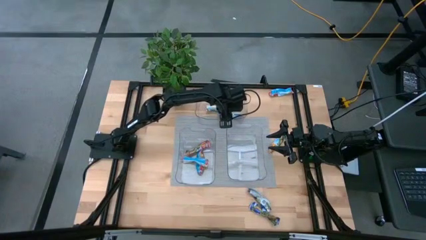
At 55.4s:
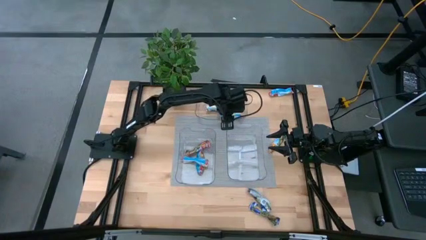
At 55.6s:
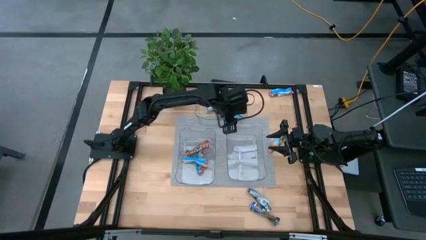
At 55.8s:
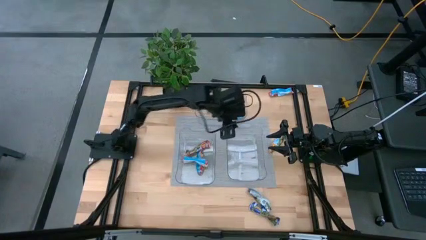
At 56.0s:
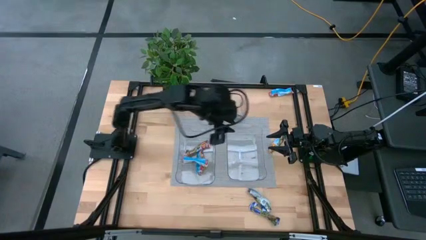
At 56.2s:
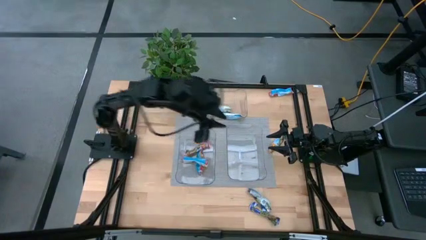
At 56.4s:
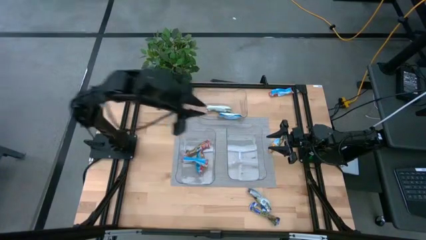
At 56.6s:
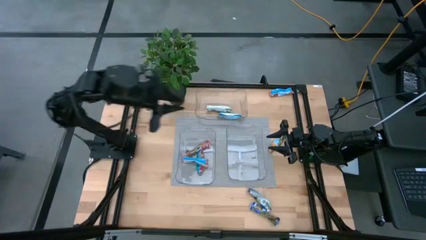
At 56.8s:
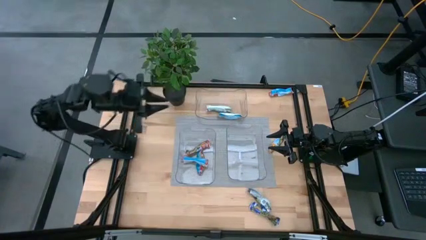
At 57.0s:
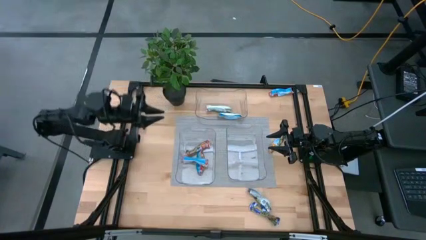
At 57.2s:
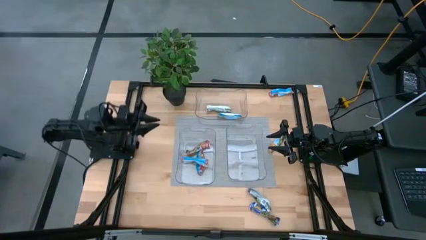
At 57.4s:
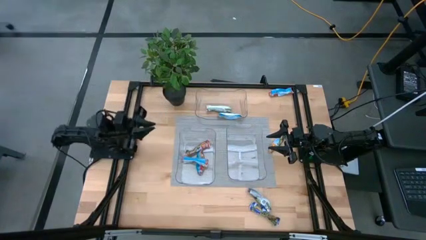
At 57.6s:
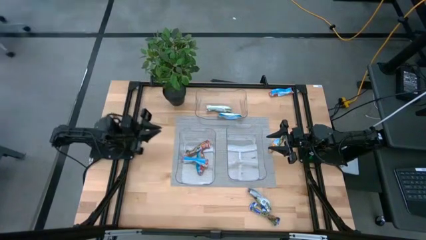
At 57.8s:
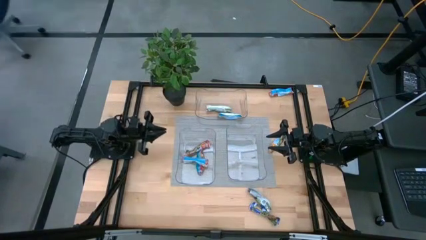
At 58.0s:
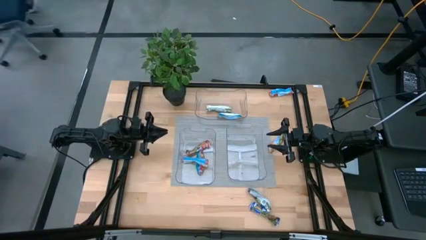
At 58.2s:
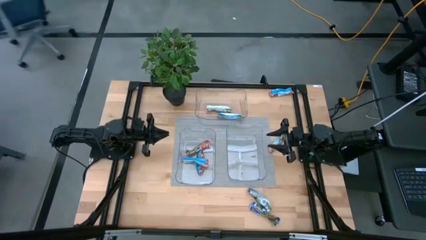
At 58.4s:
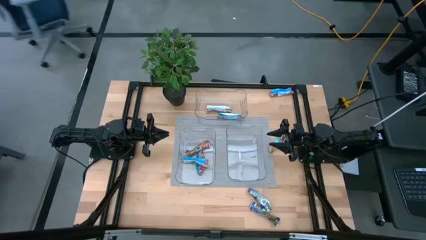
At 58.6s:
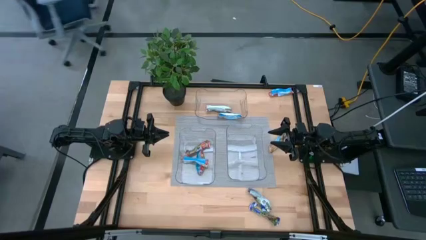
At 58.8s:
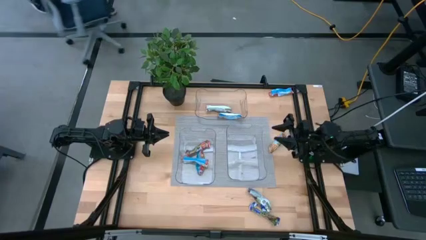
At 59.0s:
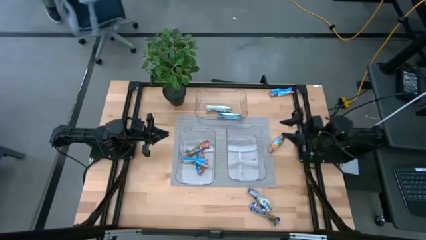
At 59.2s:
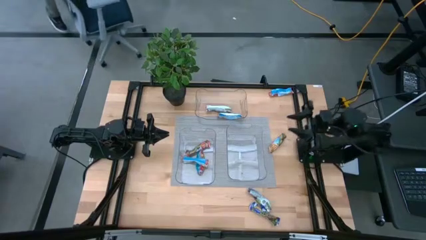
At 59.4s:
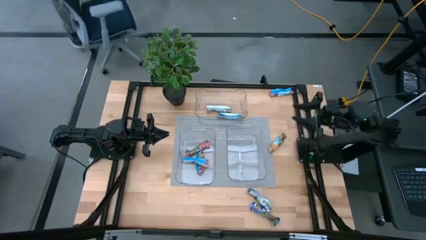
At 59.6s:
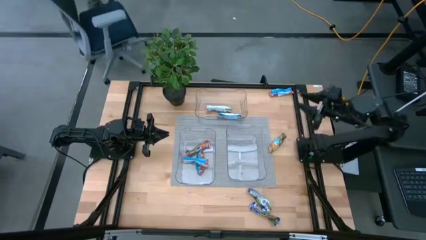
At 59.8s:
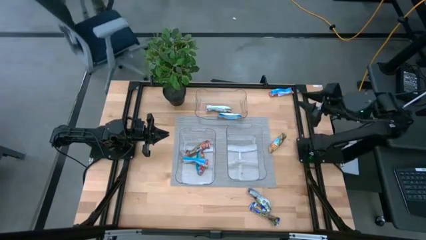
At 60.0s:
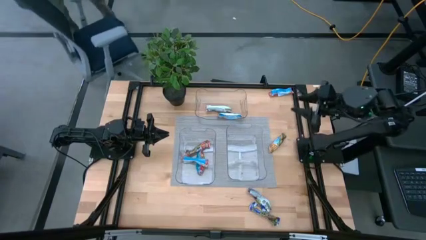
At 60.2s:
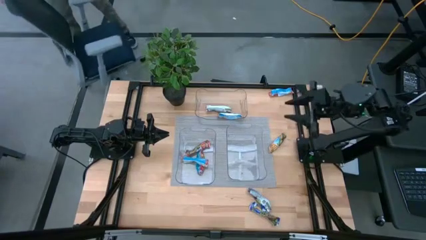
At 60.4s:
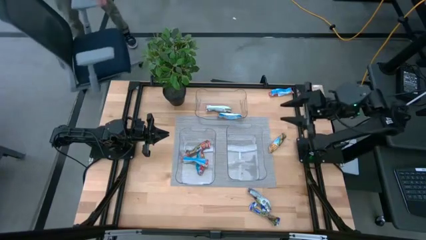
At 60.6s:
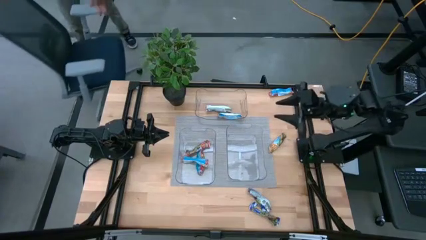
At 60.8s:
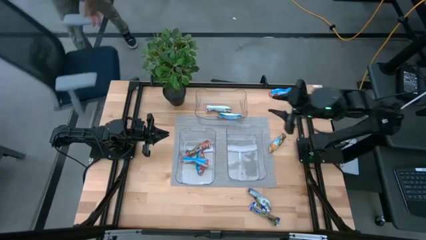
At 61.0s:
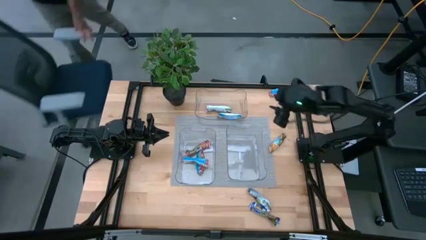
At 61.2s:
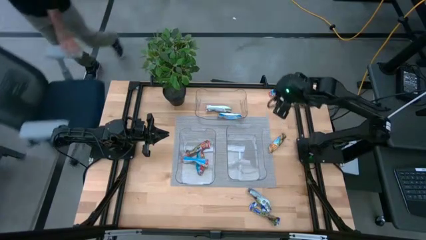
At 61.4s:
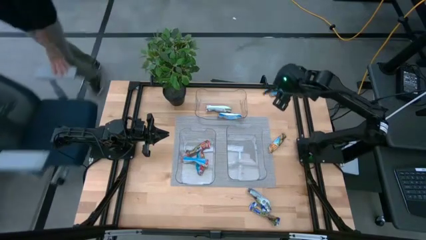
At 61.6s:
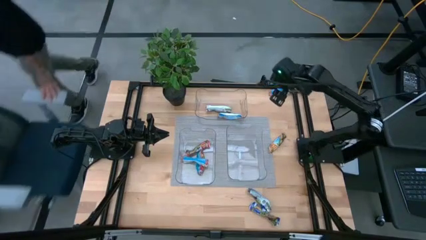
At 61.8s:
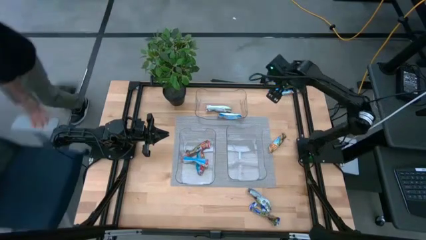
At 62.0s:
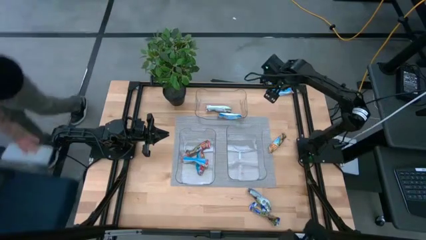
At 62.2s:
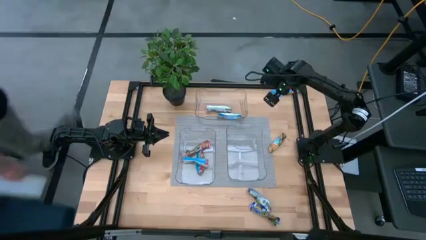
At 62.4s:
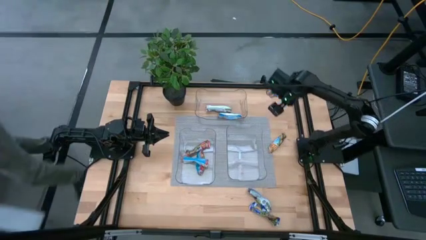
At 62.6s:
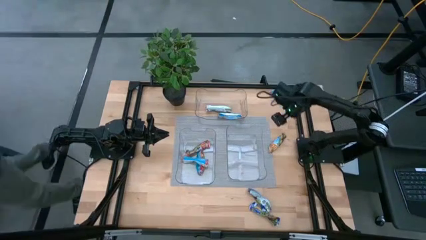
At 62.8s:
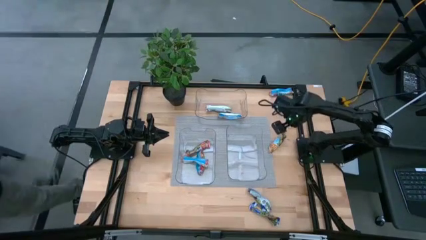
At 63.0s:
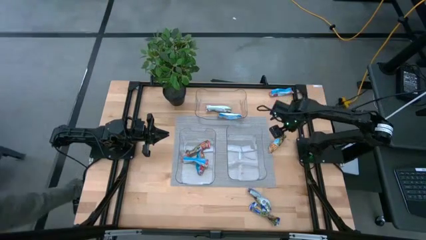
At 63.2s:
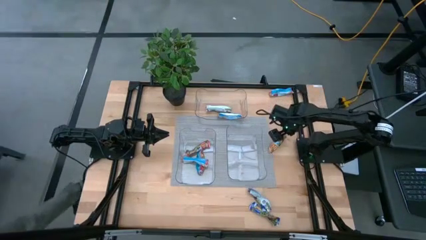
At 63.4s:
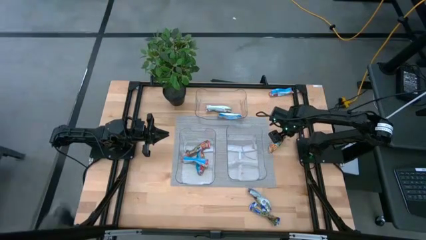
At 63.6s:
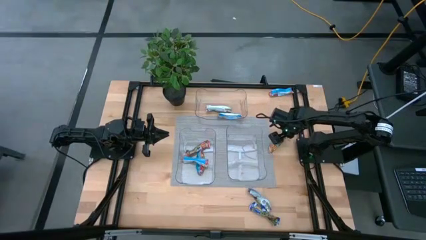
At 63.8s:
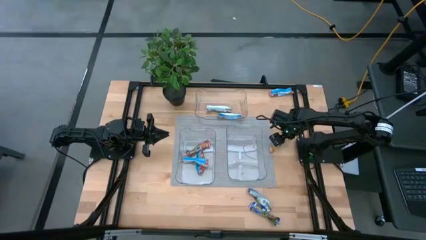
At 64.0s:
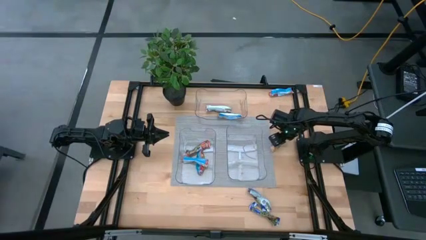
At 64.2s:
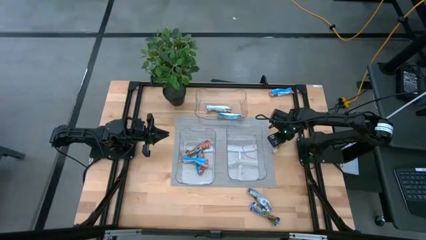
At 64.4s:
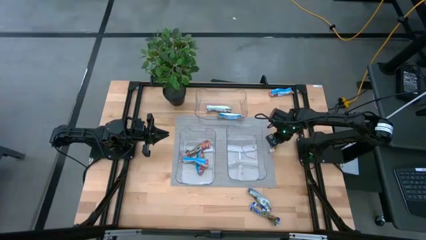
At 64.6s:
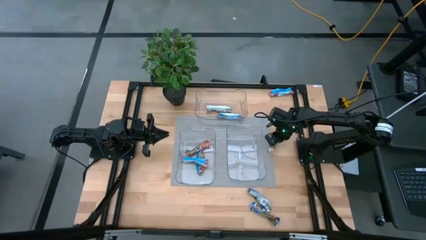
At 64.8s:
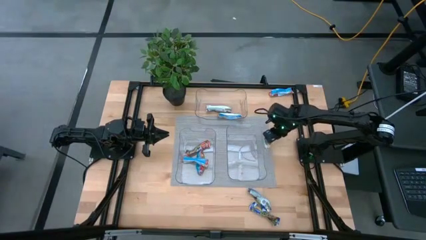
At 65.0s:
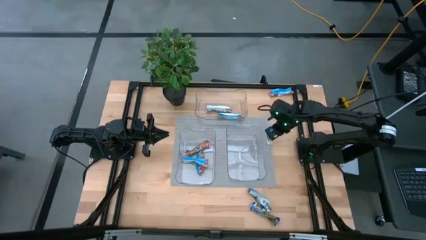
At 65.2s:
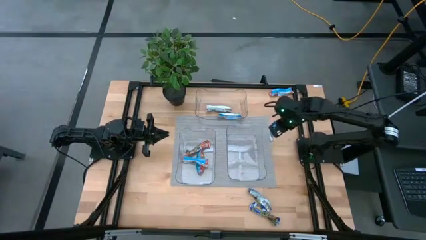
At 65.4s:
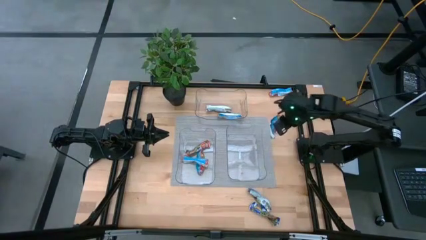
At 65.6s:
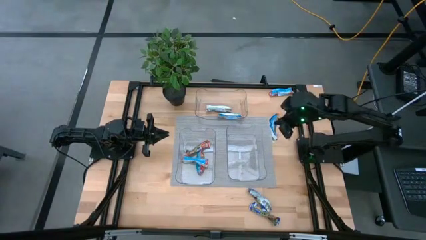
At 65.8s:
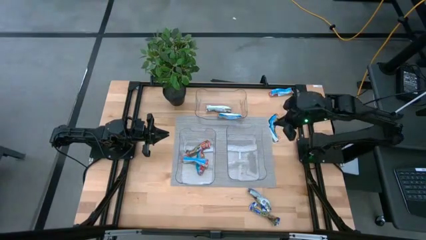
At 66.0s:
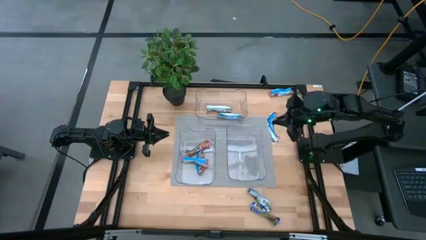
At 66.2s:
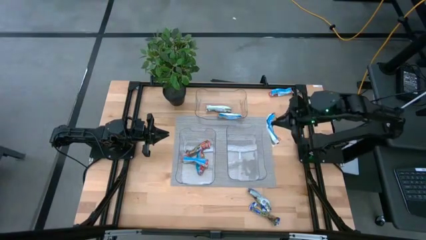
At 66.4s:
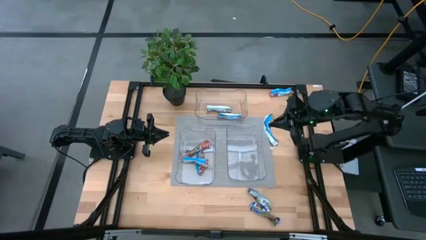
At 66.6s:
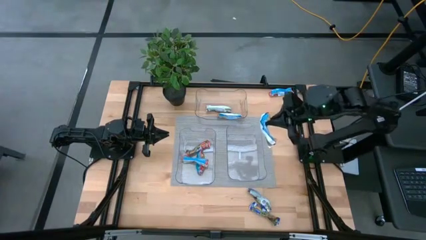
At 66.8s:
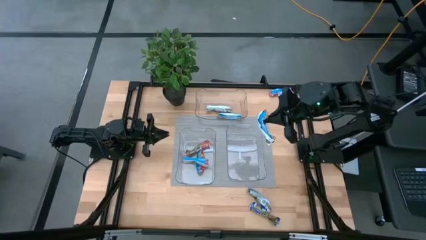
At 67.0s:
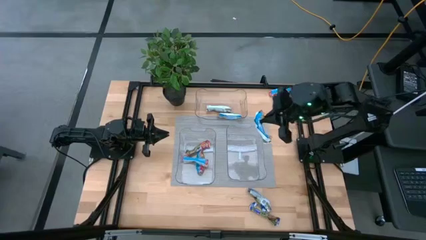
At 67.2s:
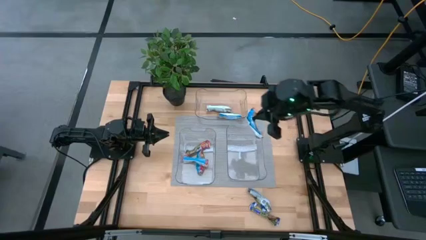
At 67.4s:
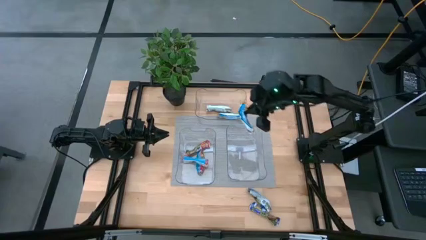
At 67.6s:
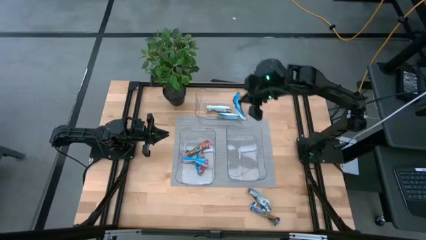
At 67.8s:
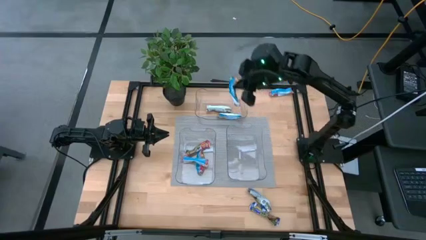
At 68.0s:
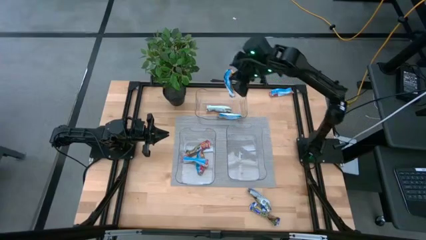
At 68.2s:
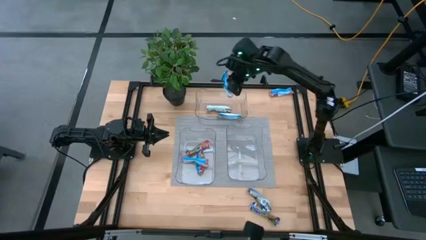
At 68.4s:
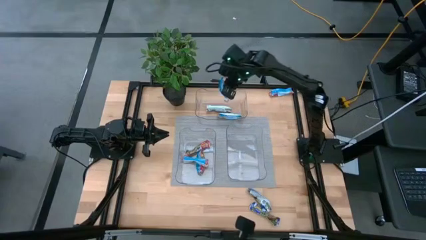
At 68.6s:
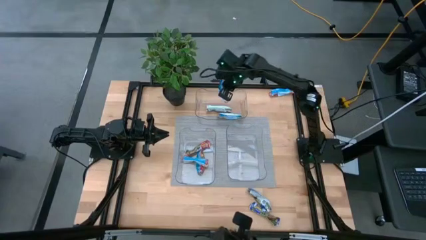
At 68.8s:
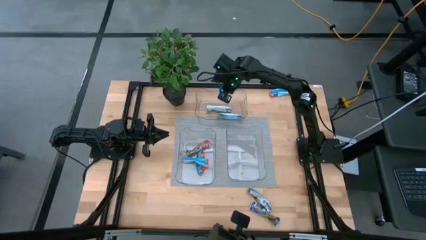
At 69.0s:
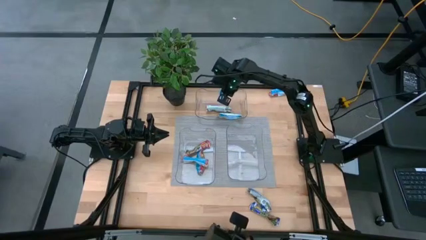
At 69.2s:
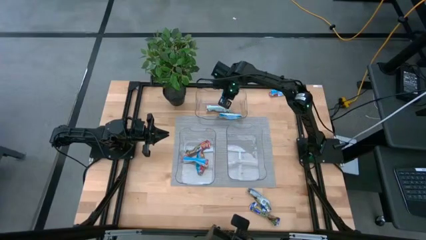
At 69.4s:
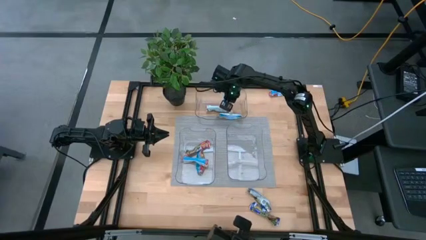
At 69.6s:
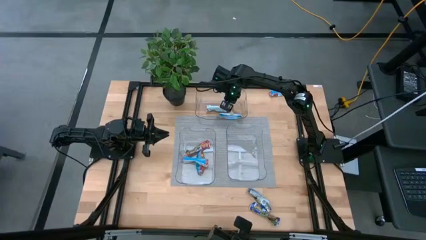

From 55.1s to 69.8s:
Task: Pick and place Granola Bars by type
Put the yellow granola bar into the top transparent bin
